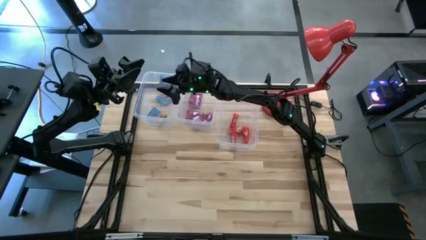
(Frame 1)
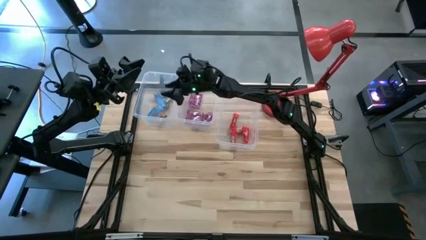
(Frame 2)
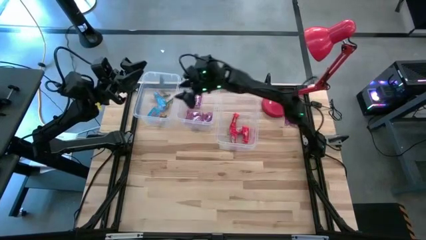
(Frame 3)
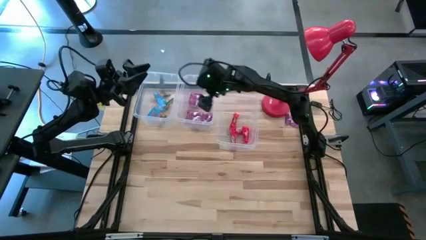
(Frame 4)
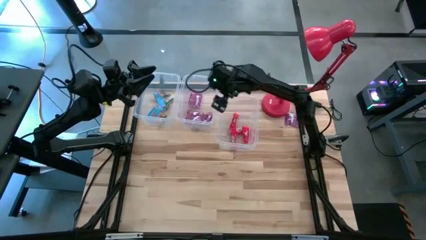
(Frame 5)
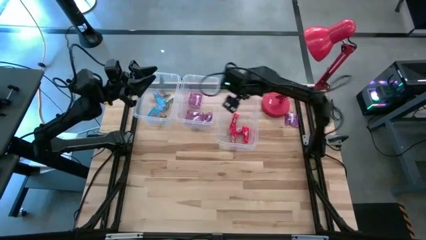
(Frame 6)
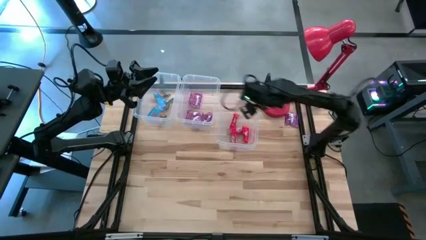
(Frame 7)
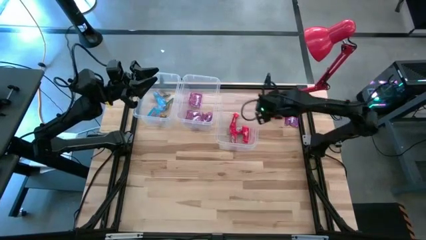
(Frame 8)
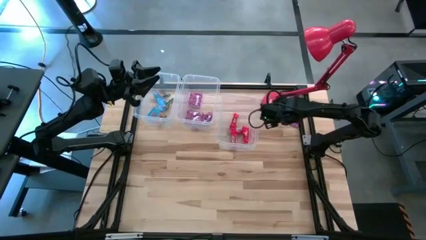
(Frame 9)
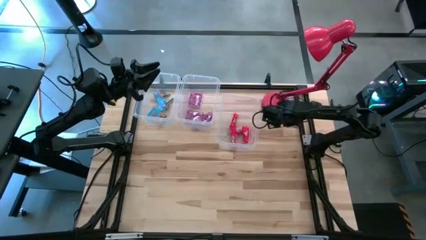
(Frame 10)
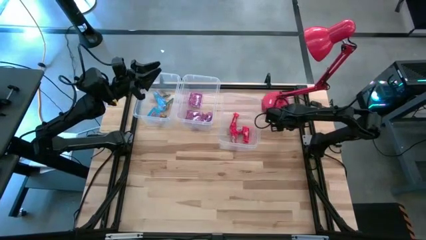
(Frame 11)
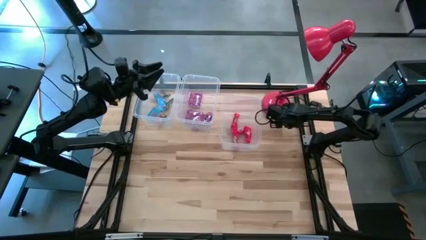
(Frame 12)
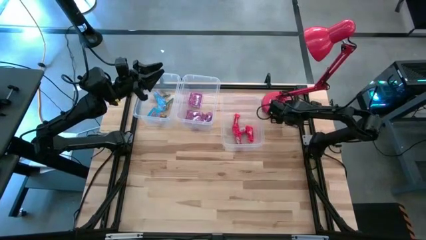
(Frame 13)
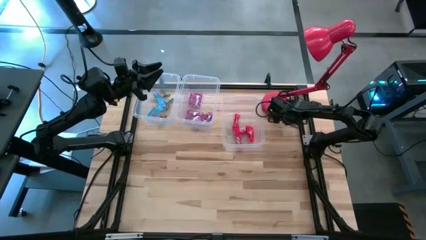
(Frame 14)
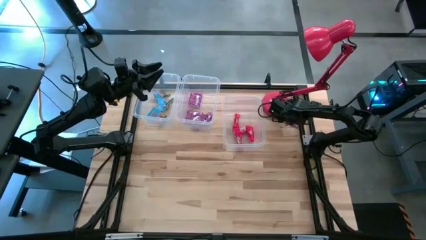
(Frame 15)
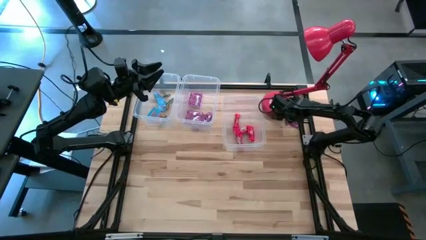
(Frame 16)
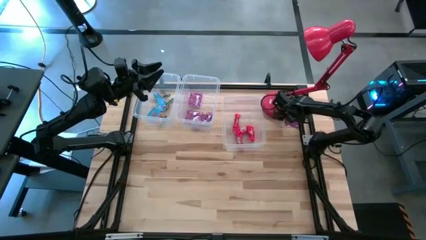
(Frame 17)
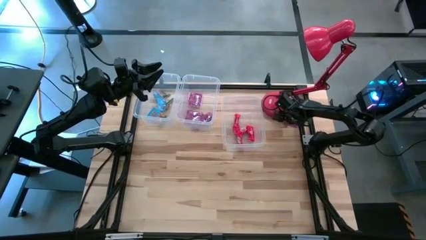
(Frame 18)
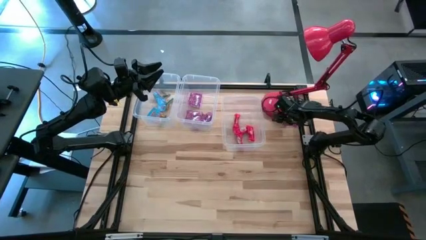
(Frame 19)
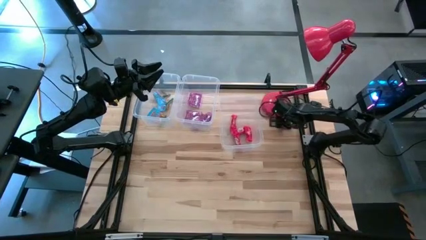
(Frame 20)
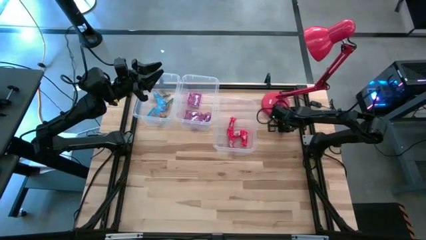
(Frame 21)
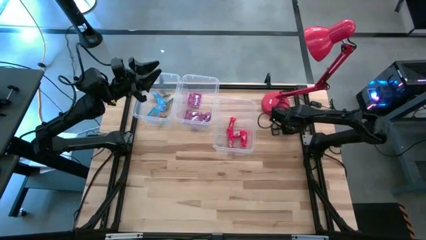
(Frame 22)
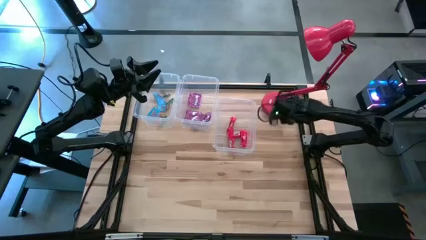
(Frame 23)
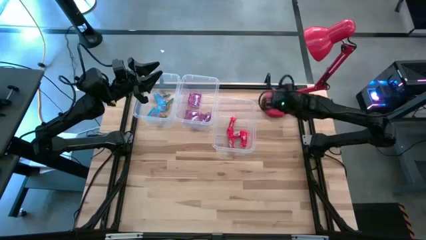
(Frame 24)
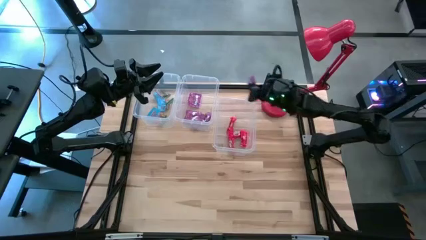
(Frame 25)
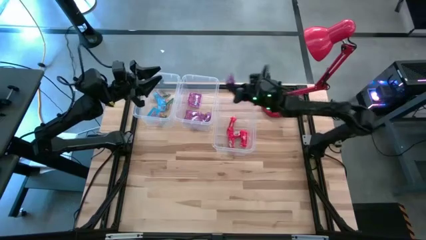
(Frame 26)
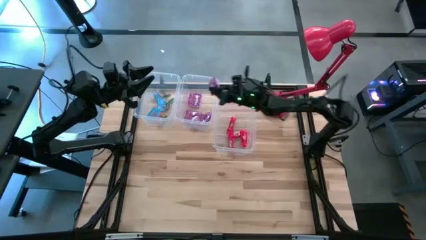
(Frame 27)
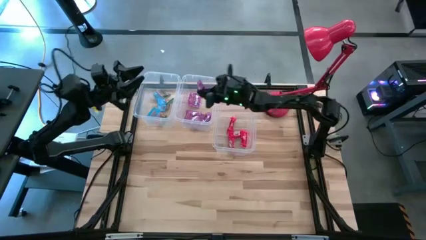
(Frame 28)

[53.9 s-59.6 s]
Task: Sort candy
Put the violet candy into the top center transparent bin

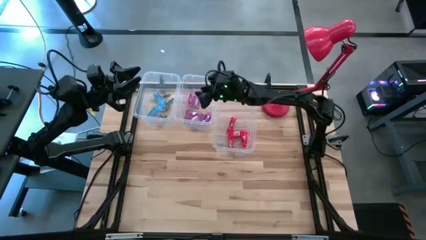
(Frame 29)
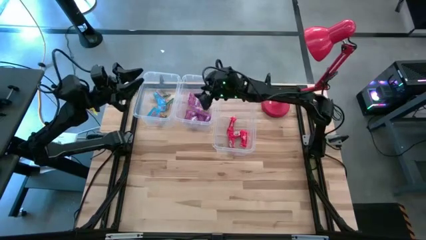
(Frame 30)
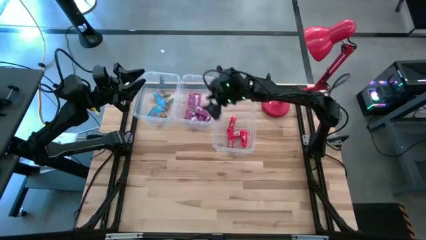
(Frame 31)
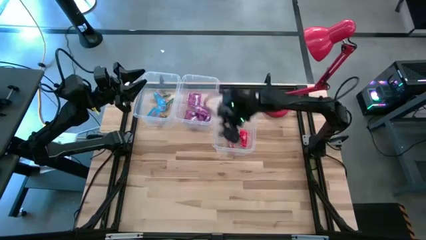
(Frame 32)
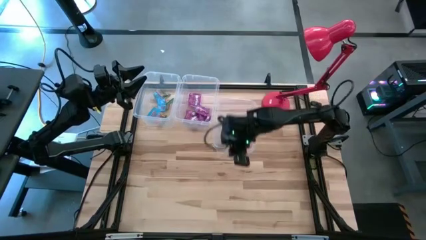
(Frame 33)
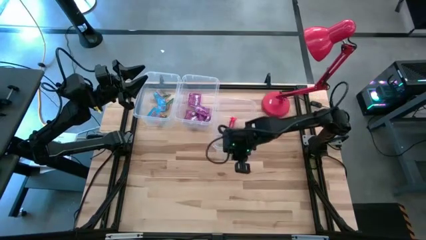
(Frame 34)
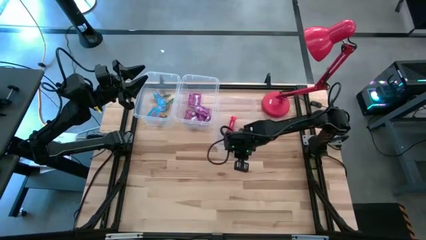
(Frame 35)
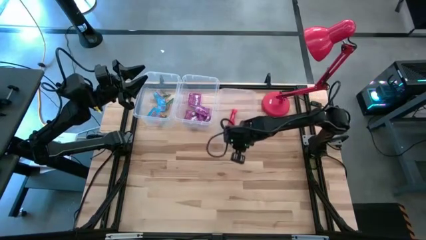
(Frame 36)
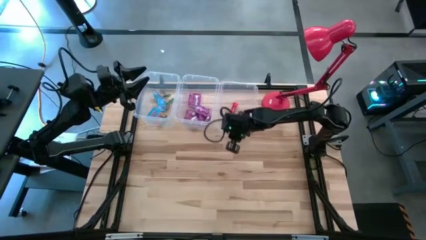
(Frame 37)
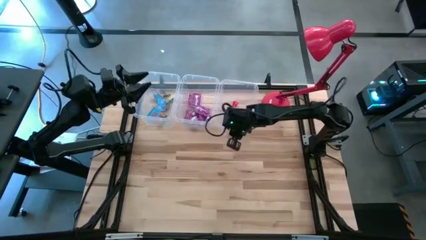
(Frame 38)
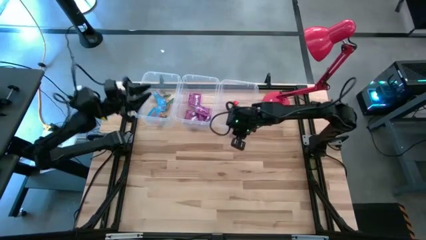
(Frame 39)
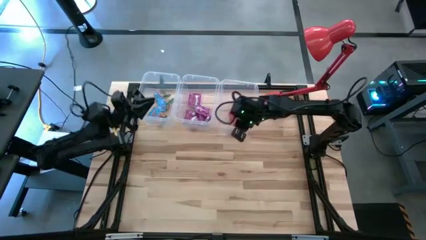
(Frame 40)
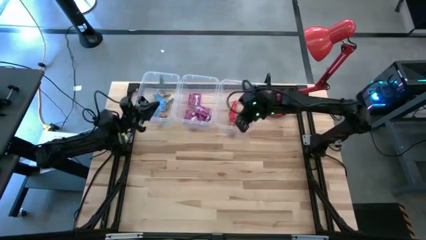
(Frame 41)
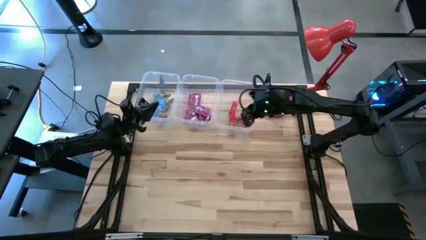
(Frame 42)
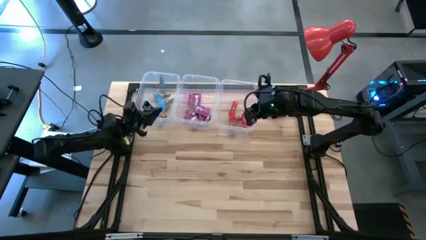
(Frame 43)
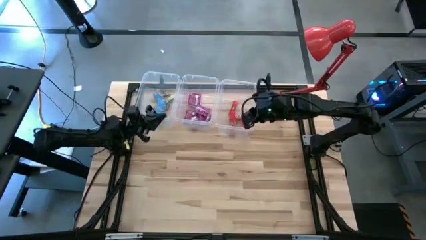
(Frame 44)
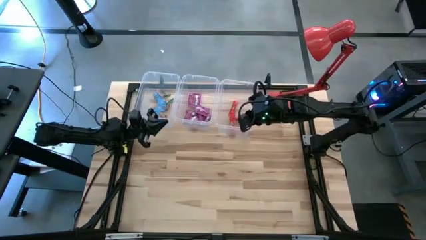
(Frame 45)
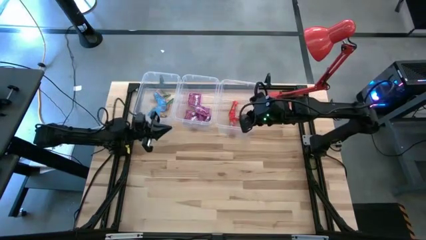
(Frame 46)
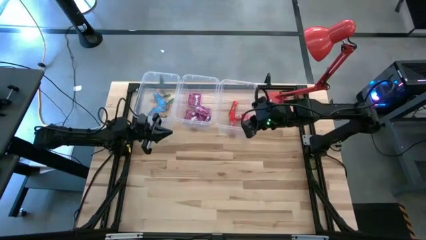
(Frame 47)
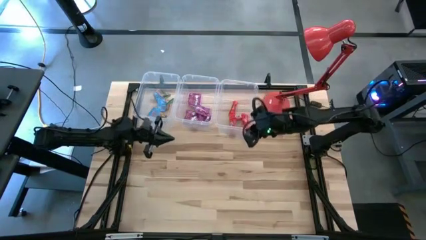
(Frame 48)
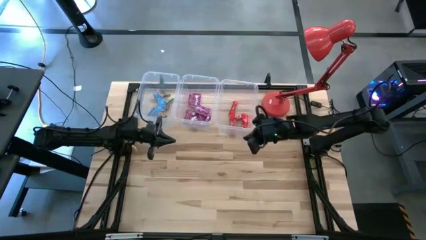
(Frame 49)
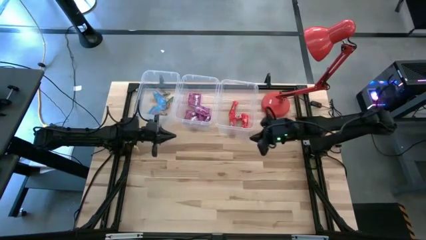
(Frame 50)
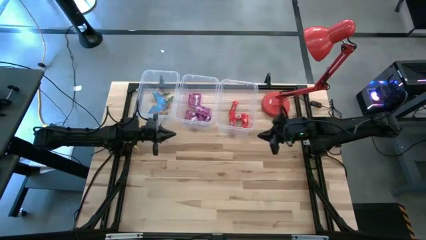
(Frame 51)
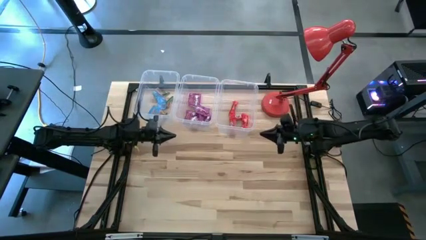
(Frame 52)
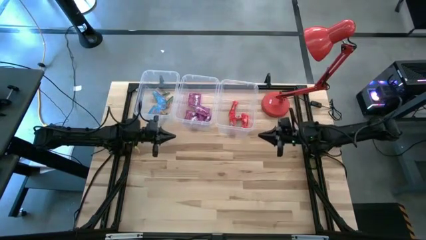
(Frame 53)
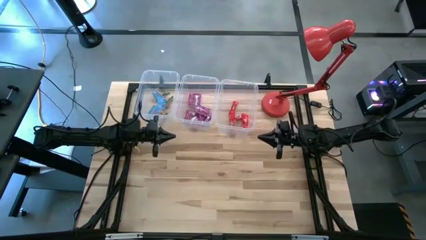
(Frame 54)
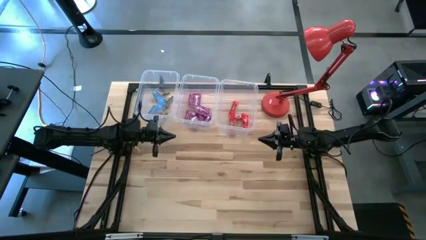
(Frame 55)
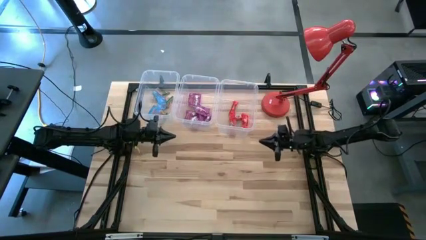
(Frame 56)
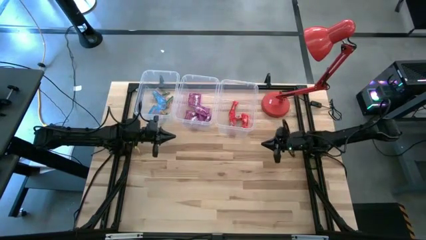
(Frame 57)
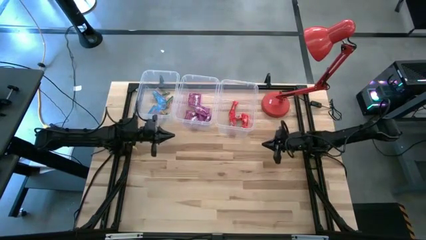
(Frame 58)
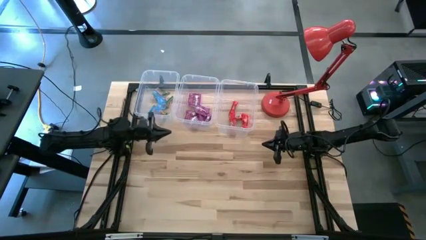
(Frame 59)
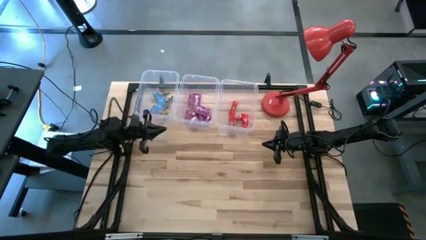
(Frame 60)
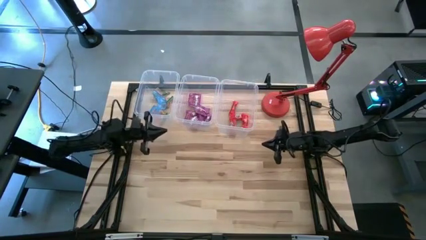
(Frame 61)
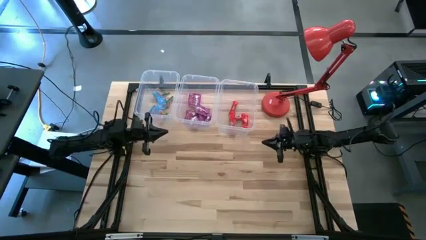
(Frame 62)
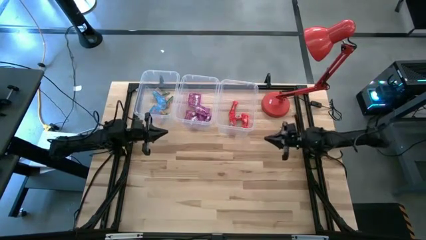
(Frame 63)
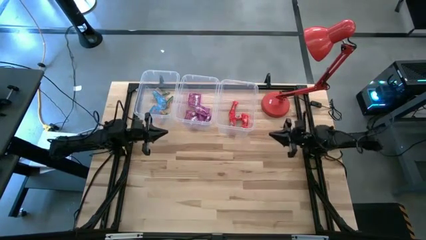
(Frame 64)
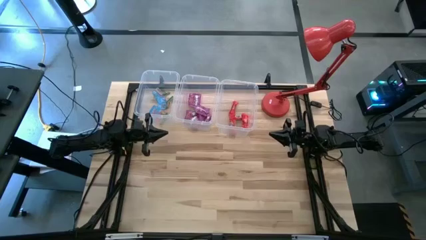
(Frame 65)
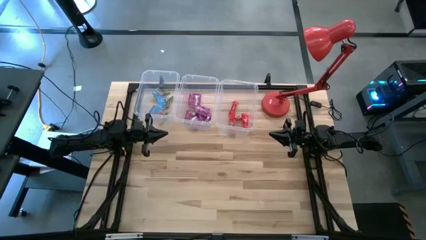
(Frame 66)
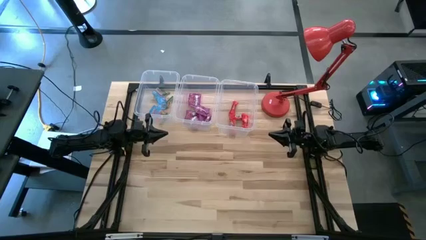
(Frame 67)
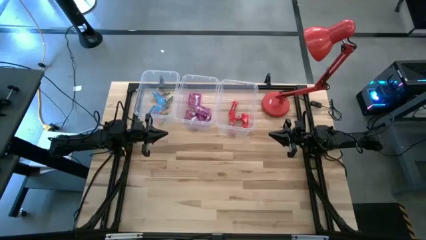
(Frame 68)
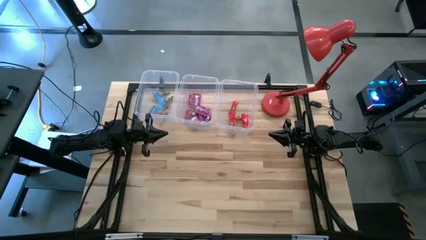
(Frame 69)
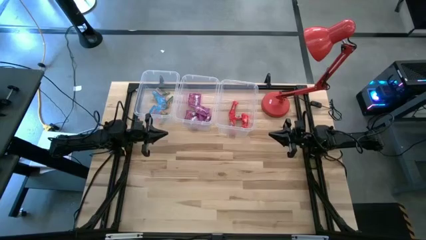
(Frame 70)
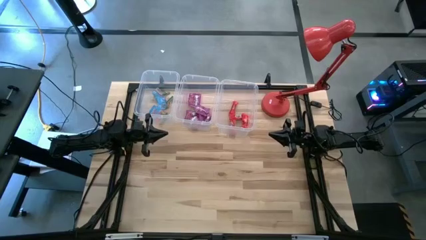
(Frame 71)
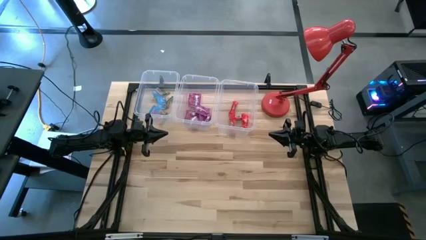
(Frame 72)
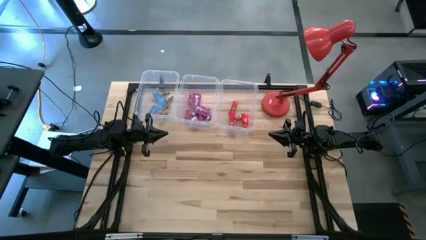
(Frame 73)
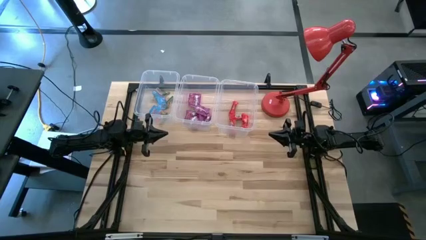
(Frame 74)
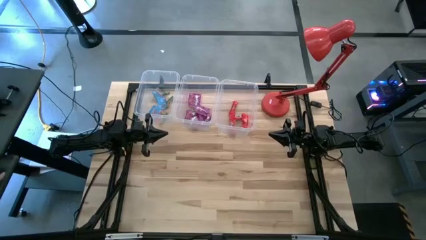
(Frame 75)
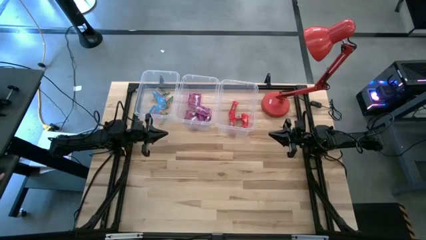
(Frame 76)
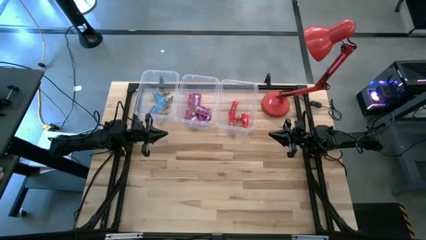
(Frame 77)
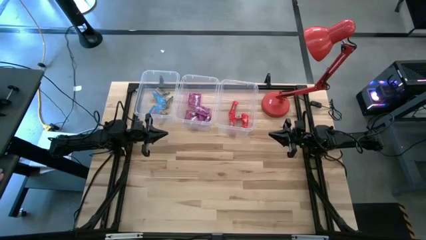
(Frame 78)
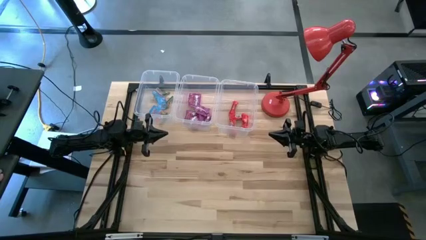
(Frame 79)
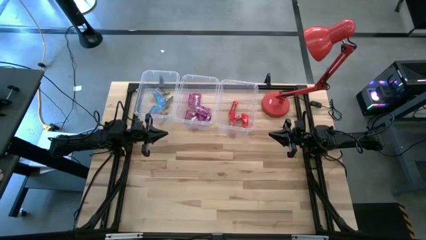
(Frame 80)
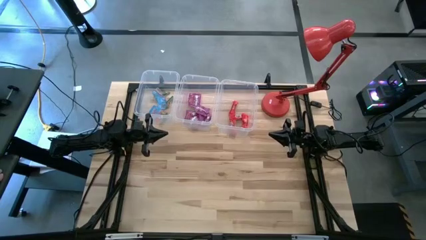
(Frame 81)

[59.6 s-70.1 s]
Return to Home Position

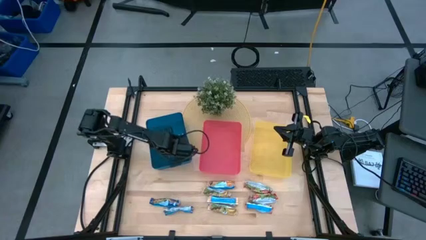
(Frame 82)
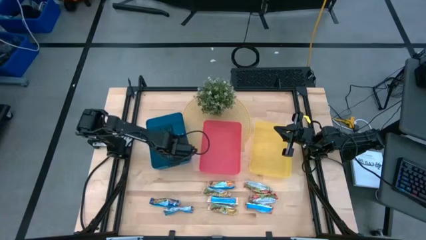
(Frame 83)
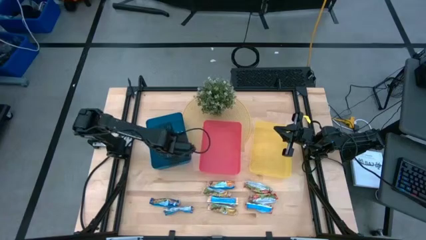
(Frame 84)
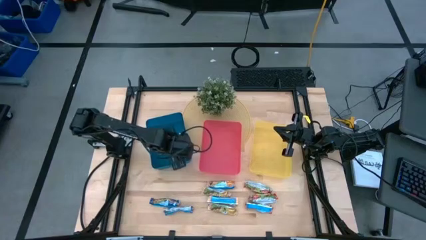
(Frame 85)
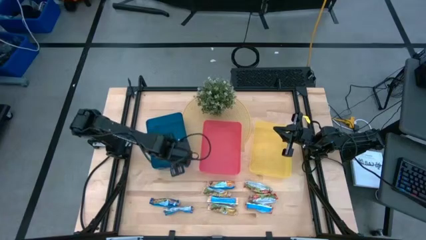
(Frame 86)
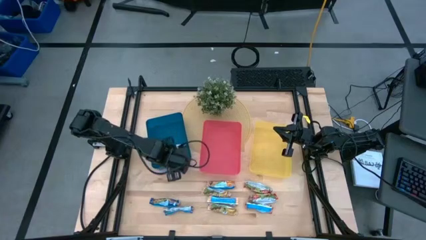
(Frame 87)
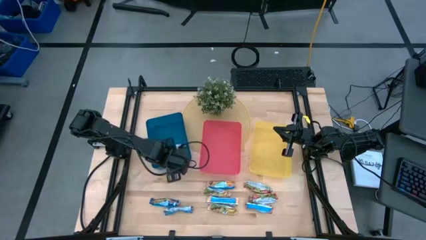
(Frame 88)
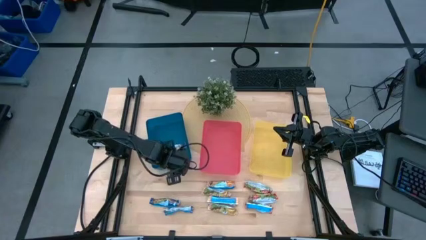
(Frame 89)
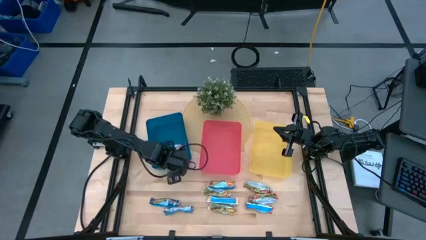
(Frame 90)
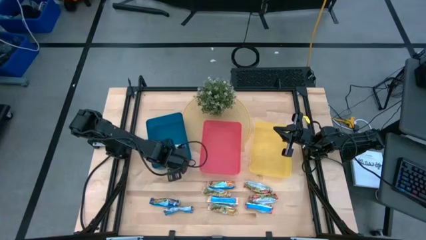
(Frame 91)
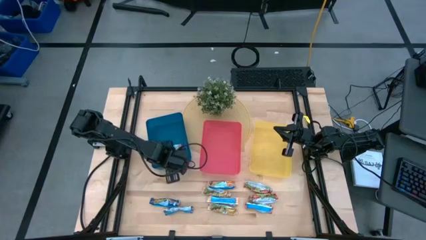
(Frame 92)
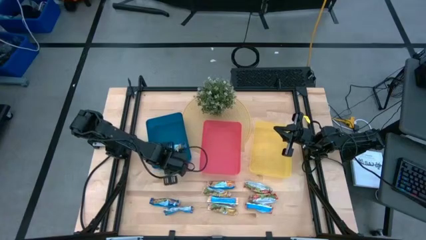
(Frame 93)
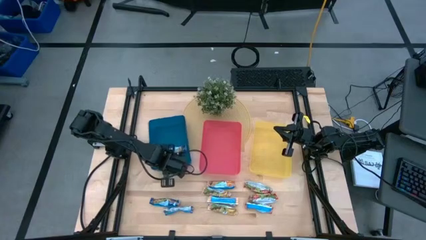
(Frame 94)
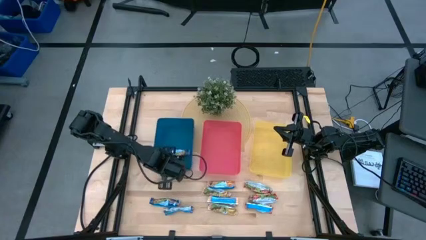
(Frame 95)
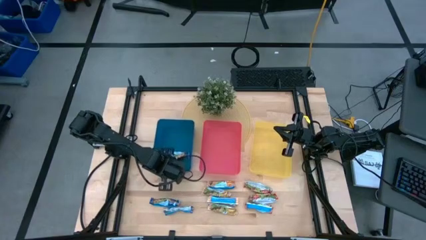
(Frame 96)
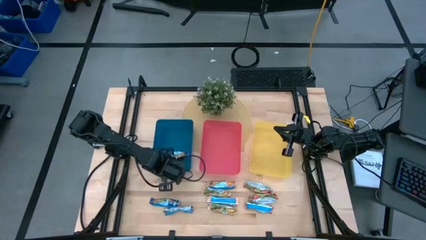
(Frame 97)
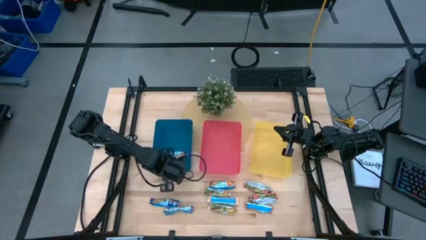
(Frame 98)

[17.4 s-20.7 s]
Task: Pick and place Granola Bars by type
Adjust the blue bin on the table
